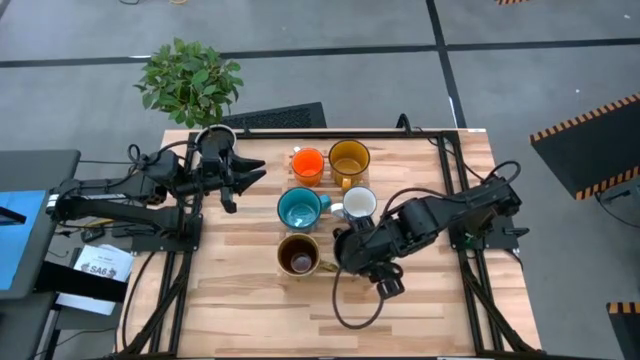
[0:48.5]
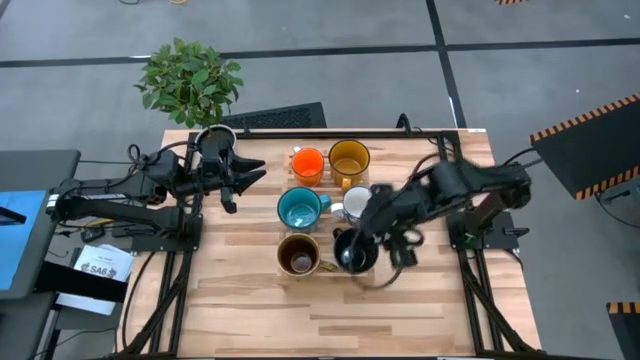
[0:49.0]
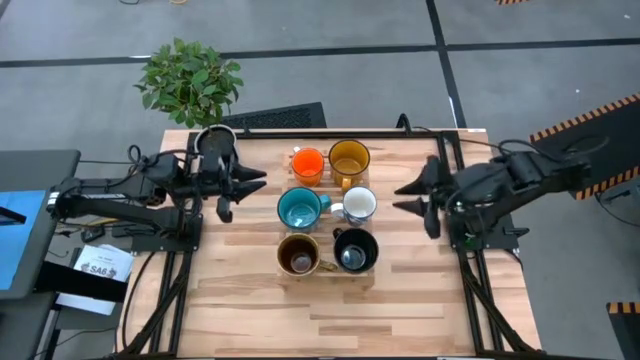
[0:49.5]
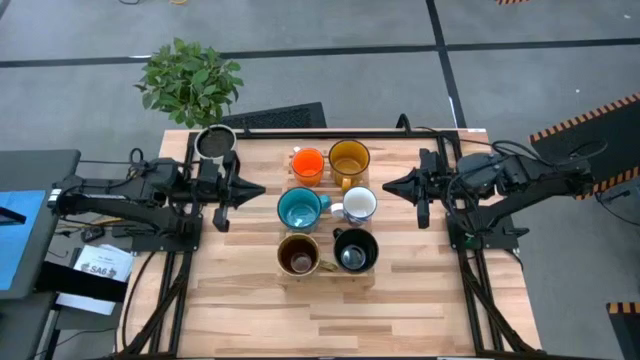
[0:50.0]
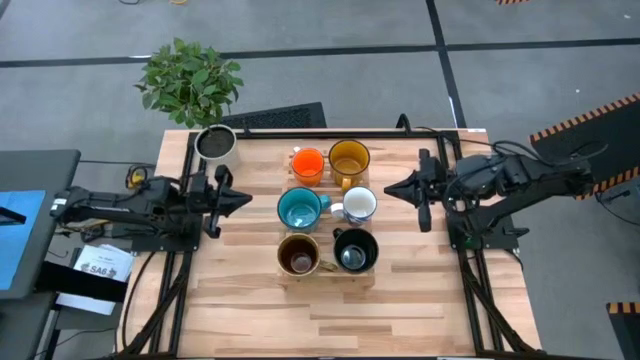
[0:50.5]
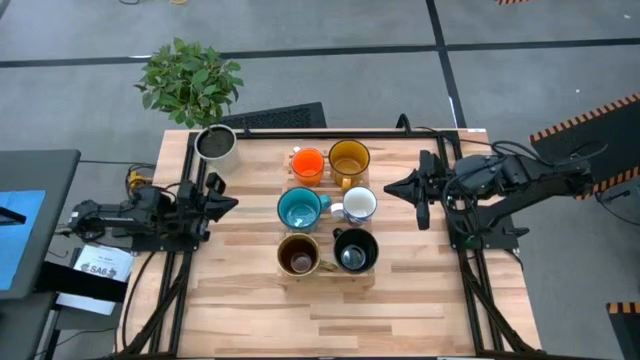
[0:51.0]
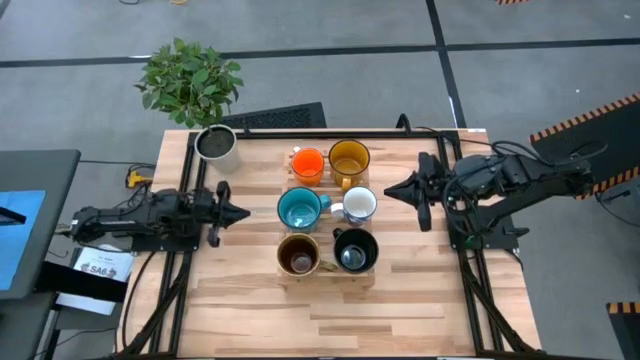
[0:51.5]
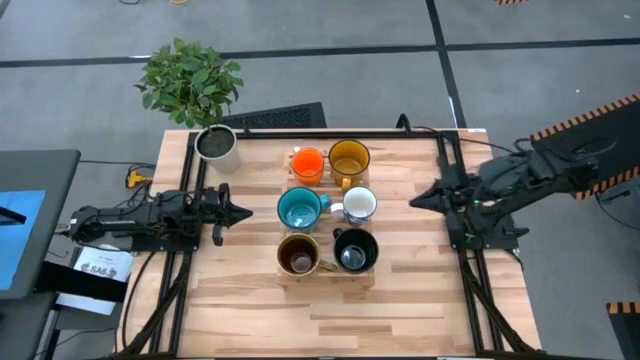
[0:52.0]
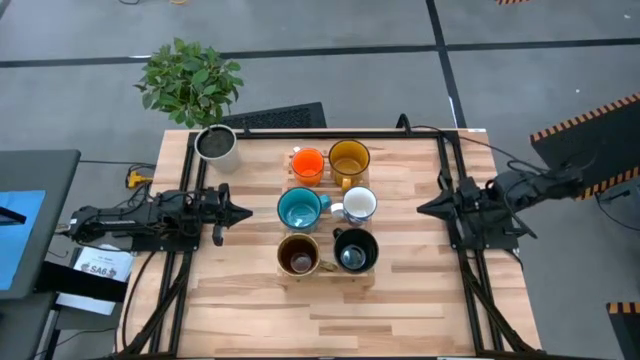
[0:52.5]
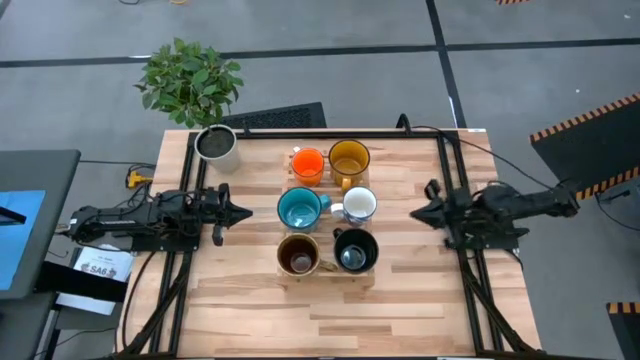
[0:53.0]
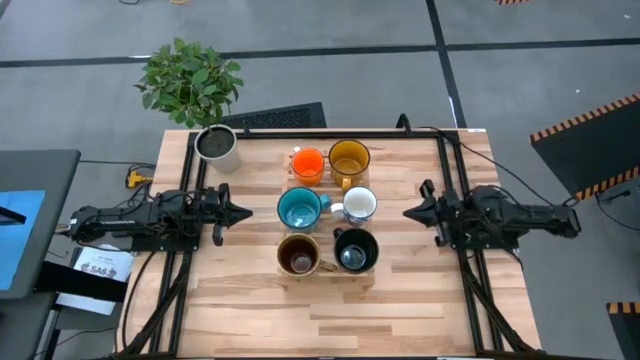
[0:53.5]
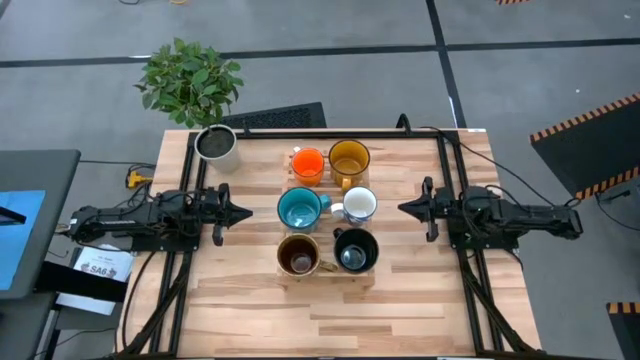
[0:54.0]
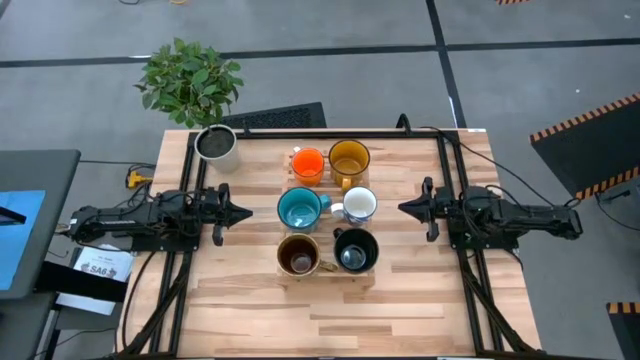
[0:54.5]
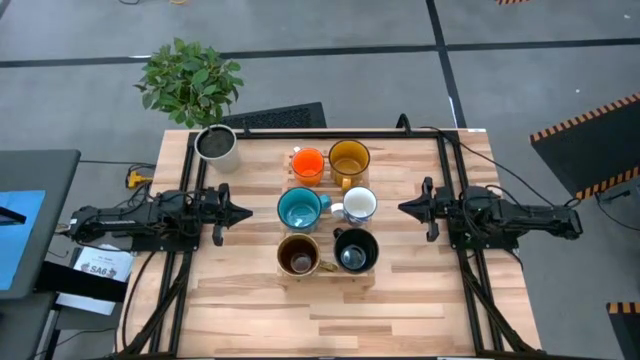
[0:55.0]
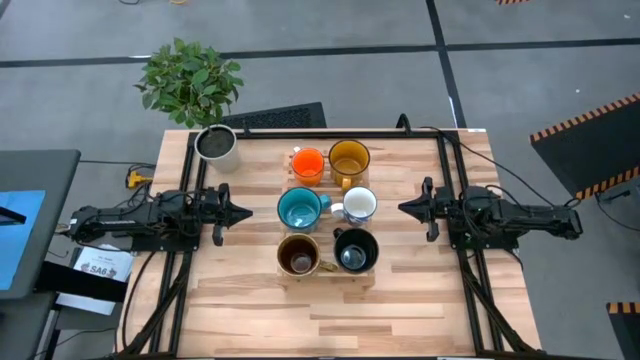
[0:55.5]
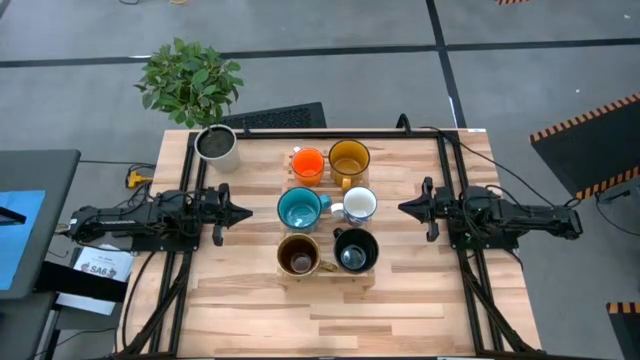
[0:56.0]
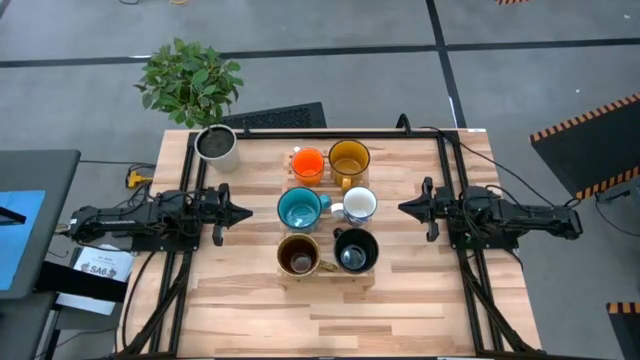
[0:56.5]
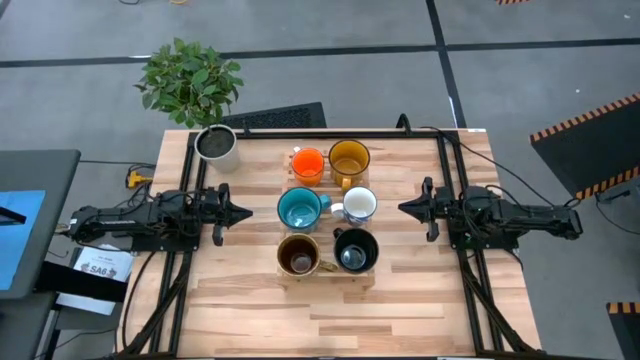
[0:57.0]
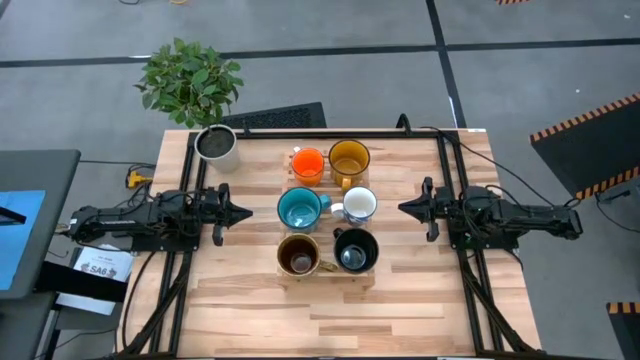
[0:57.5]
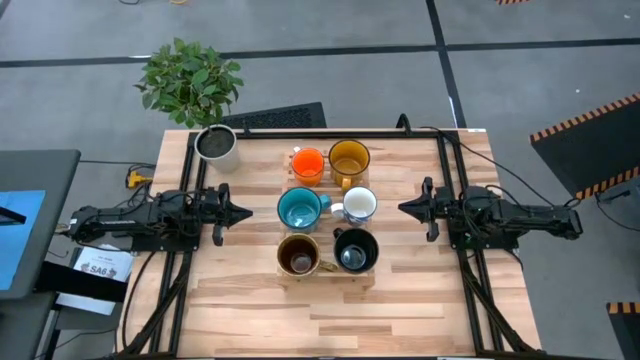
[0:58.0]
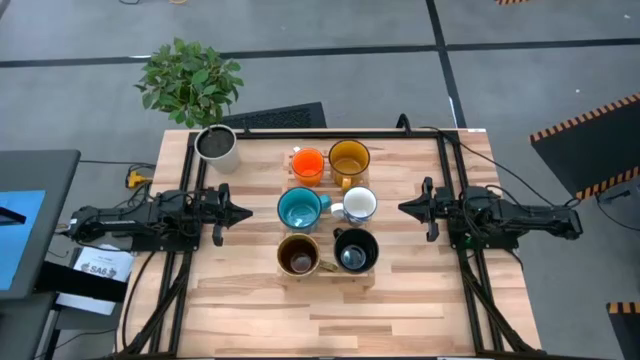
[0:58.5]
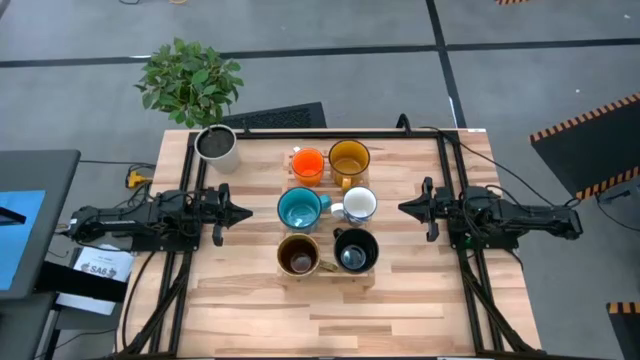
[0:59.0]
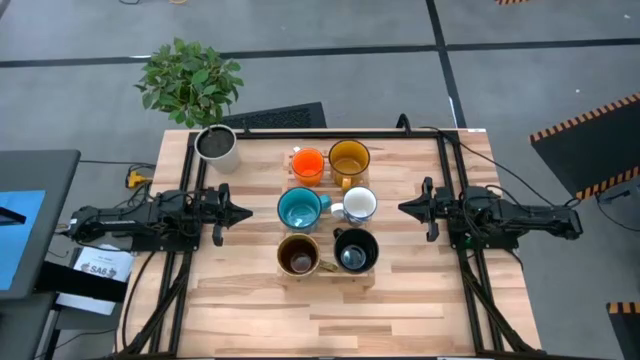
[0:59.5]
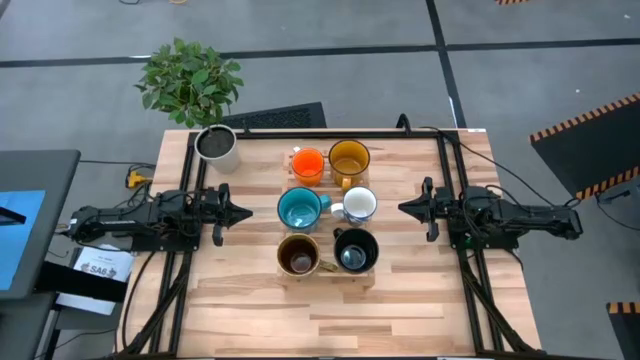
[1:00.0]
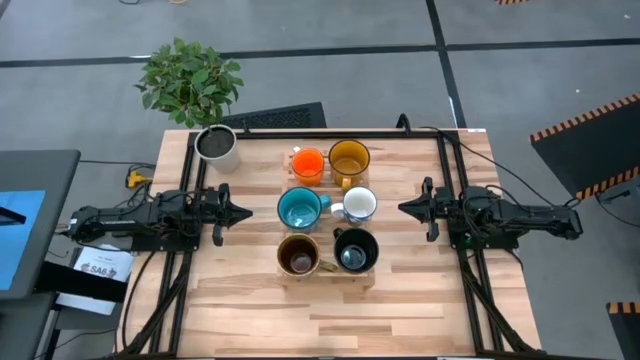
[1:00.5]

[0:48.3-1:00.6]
Task: Place coffee mugs
Return to Home Position

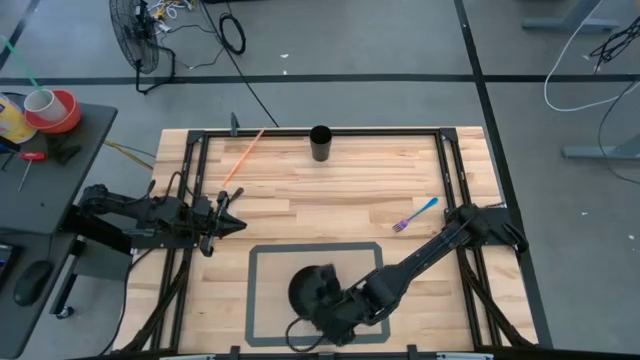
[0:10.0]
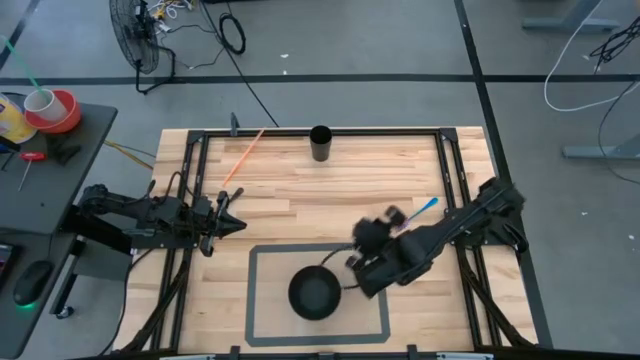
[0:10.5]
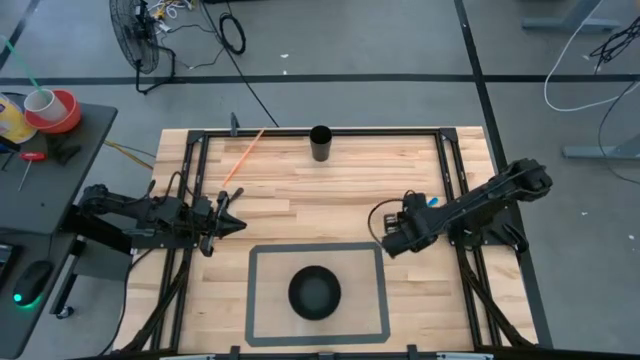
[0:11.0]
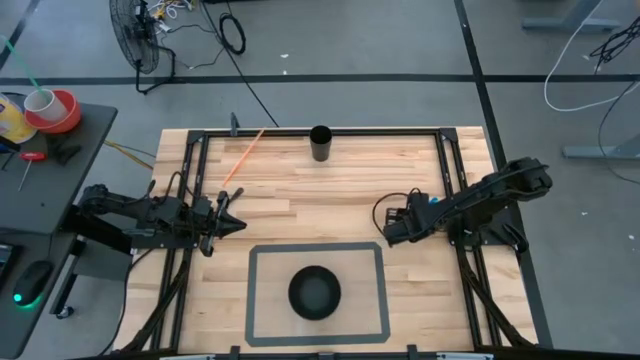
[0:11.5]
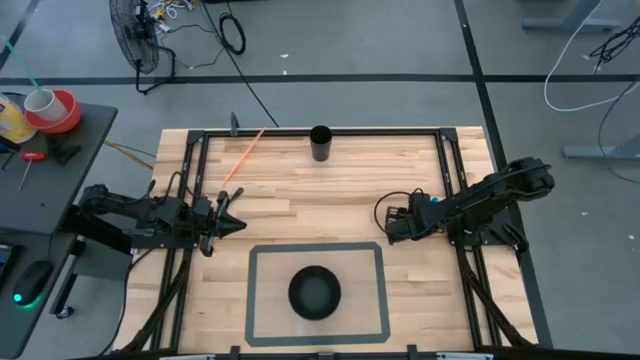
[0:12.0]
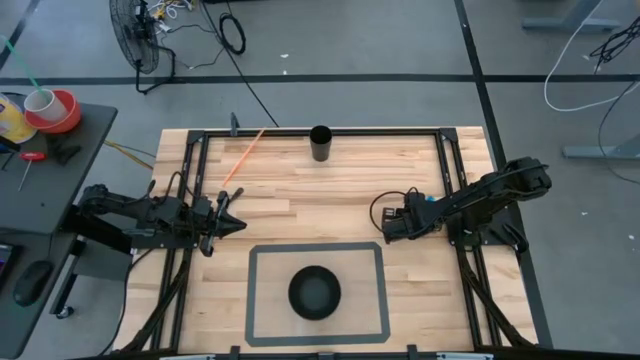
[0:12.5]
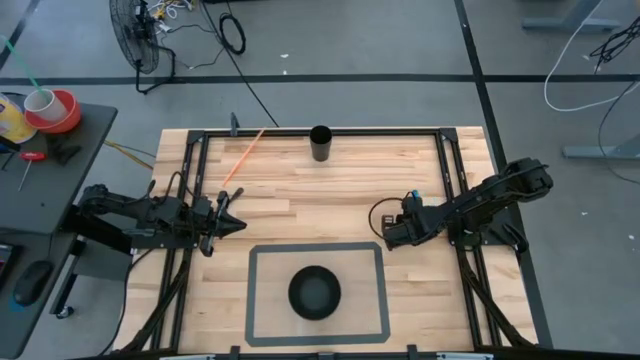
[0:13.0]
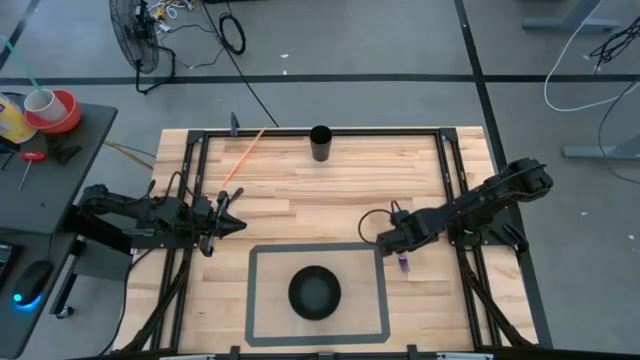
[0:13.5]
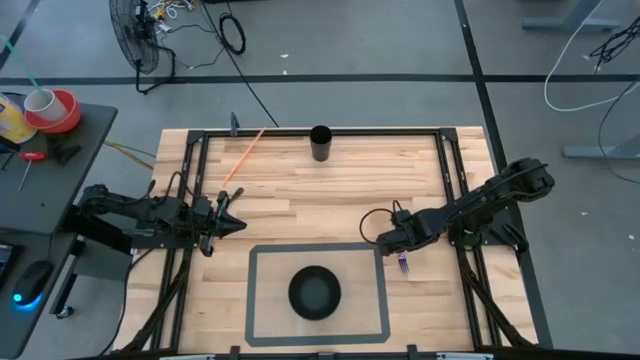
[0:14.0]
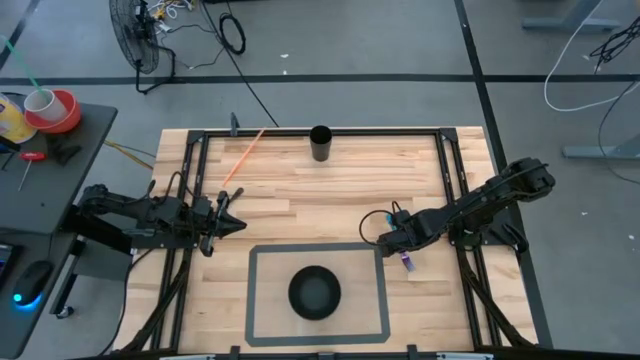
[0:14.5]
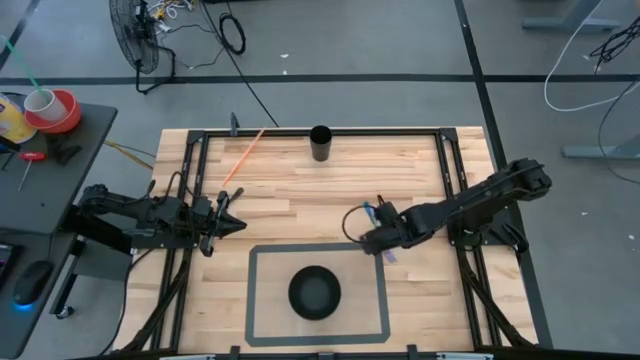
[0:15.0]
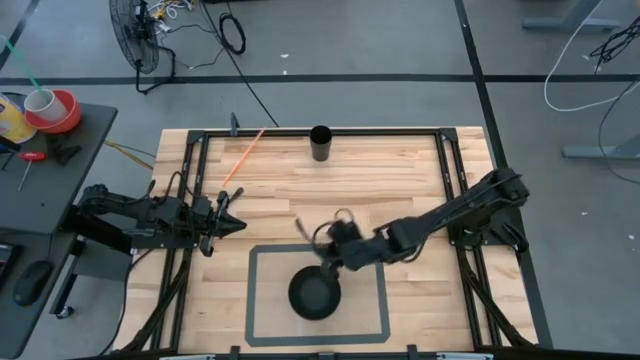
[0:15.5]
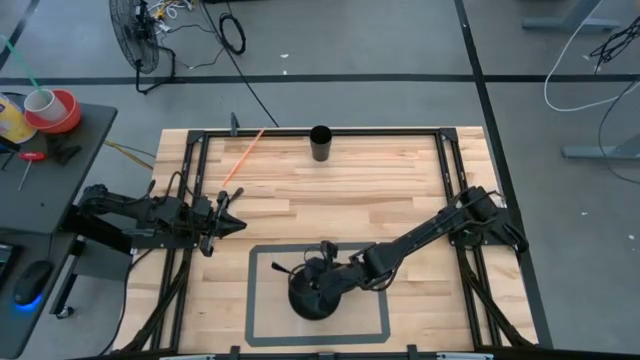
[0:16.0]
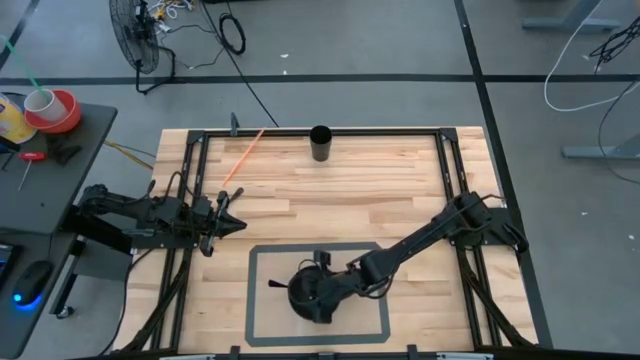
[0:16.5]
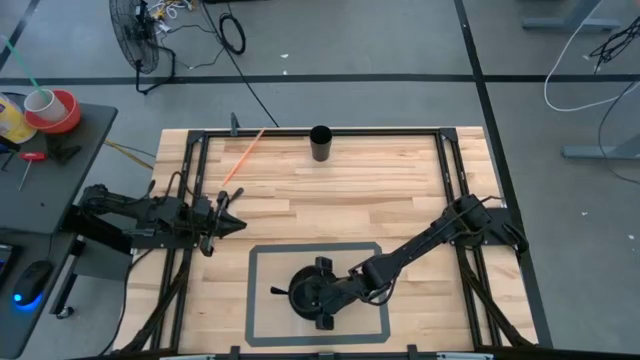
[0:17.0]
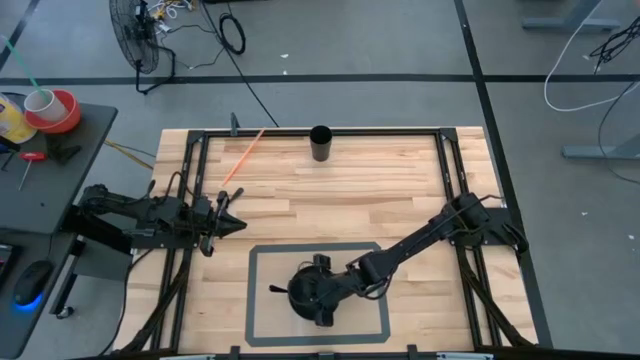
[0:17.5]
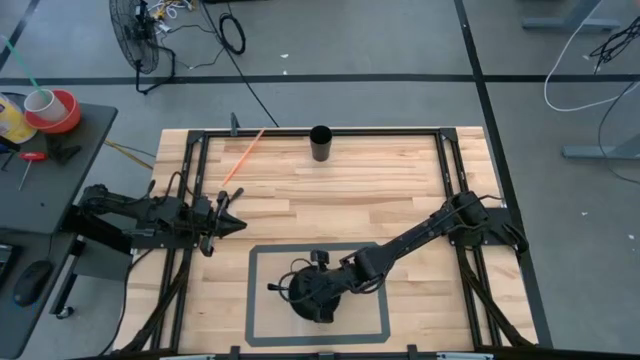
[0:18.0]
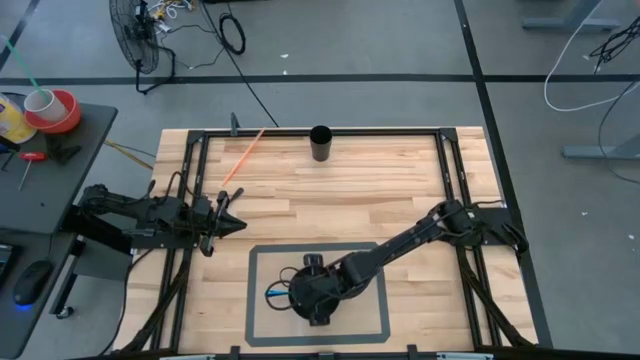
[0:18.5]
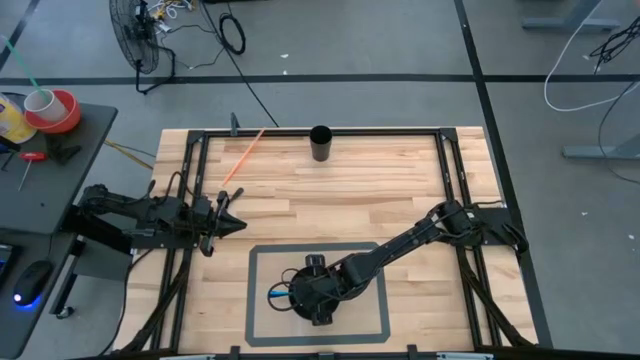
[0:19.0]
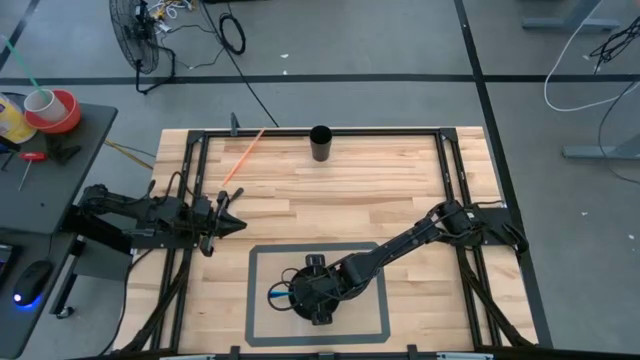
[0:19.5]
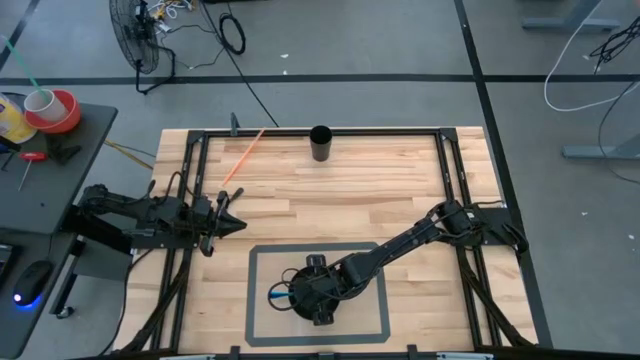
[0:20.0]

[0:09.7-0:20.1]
Task: Pick & Place Utensil
Put the fork into the black bowl on the transparent mat
